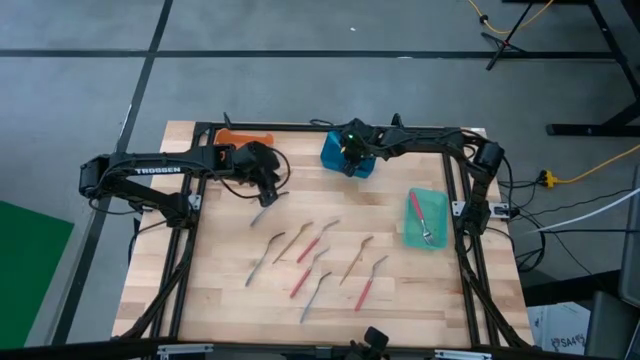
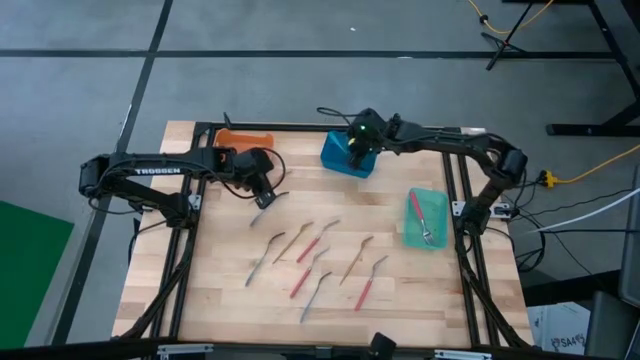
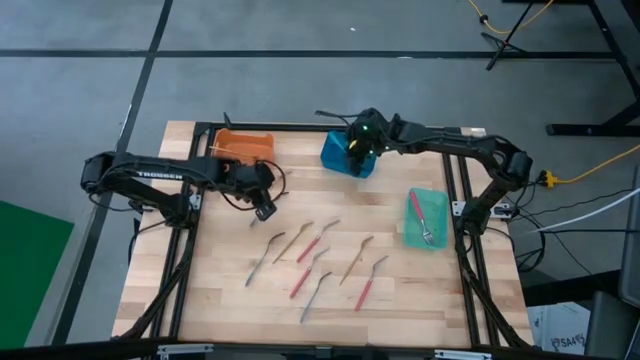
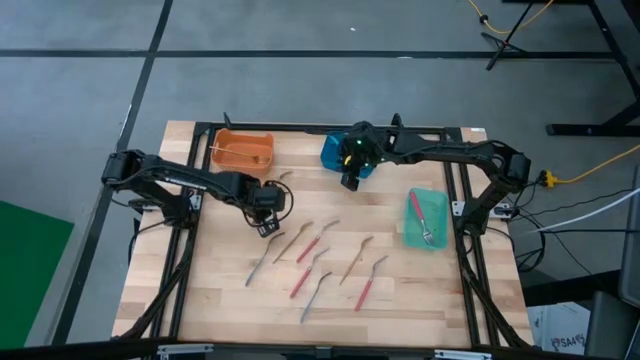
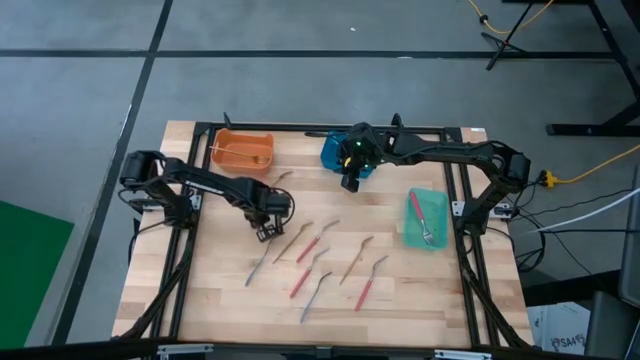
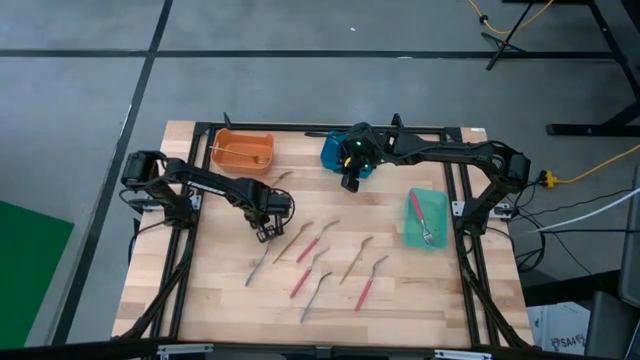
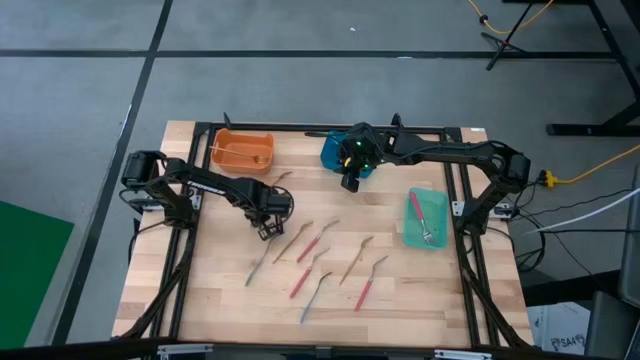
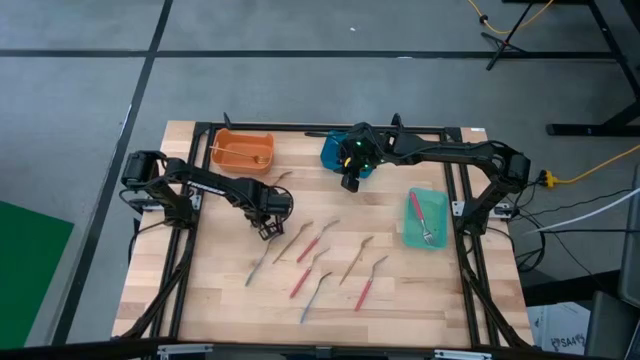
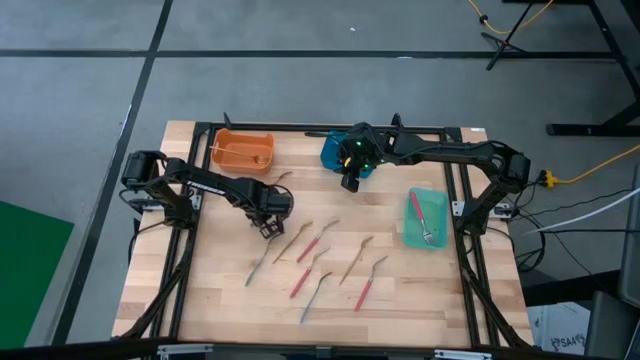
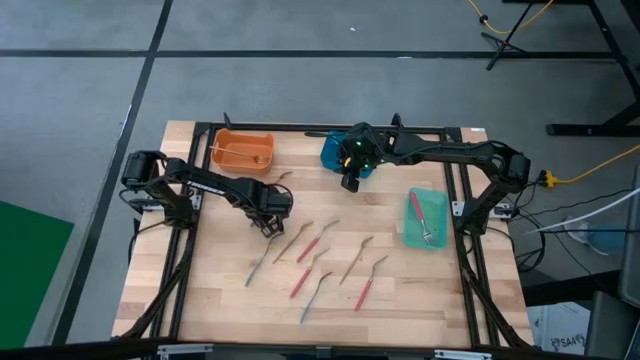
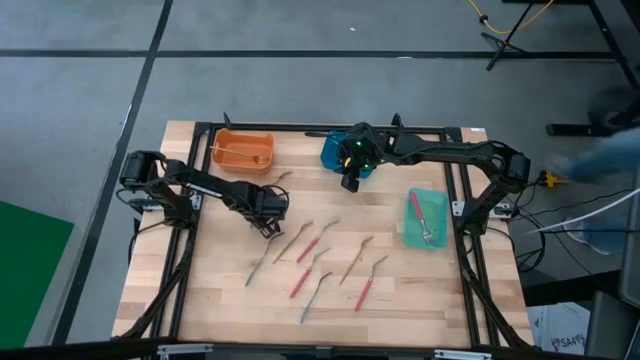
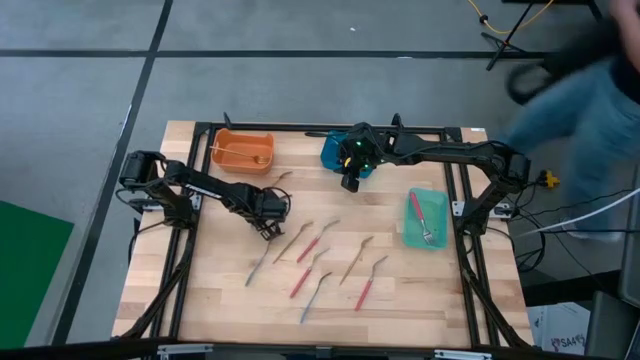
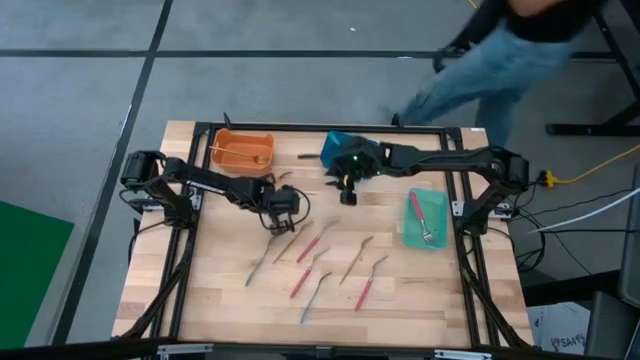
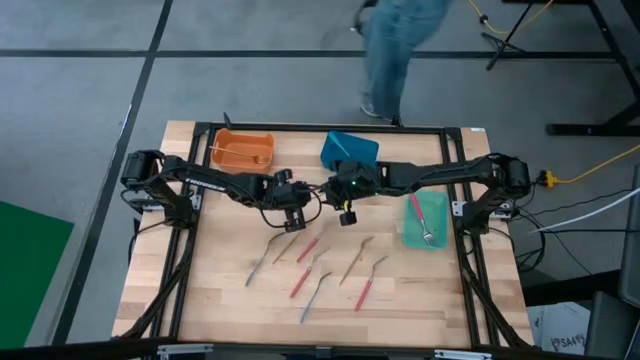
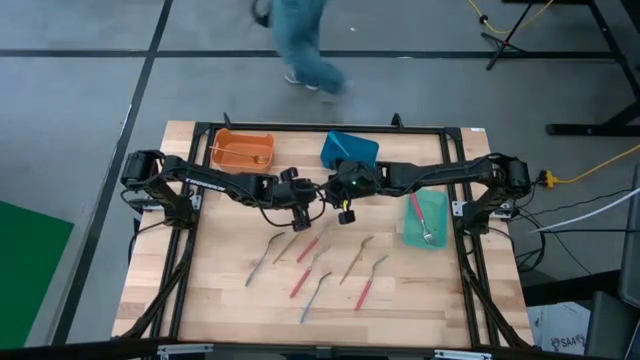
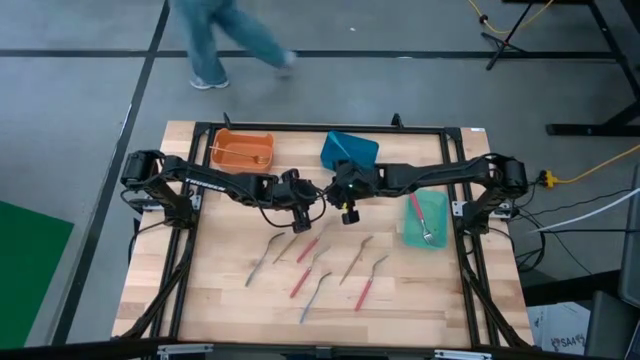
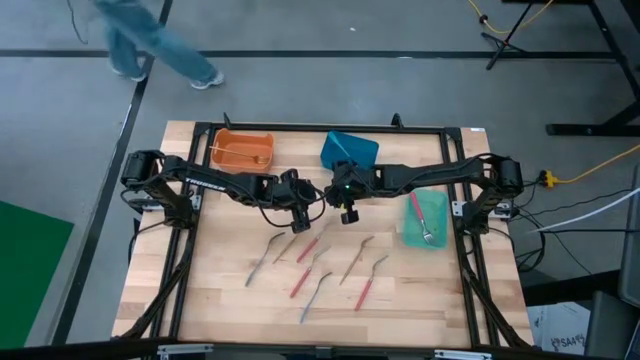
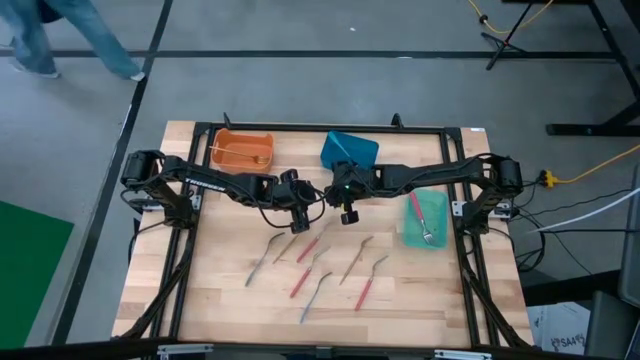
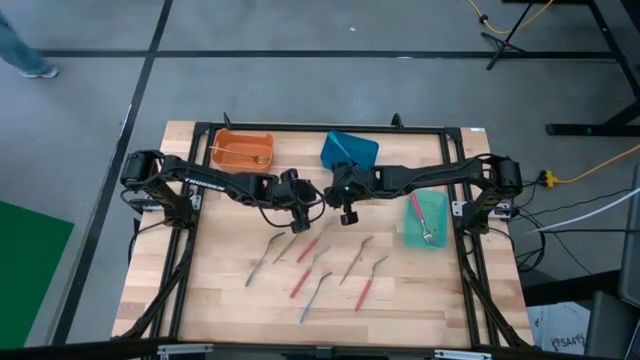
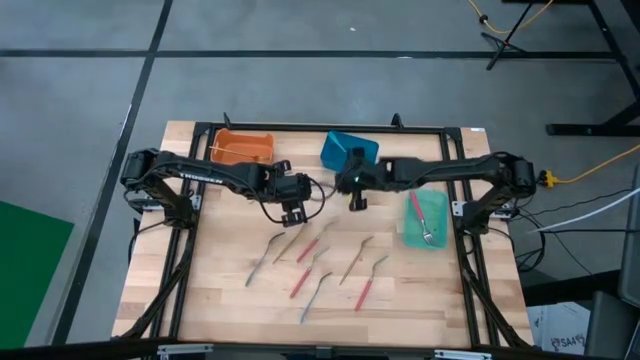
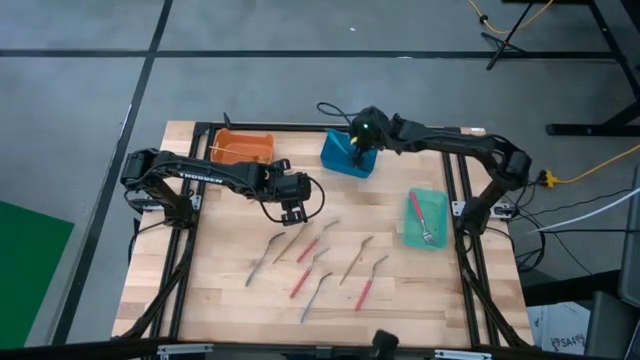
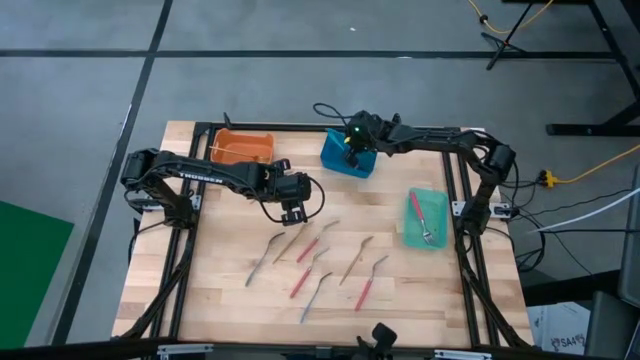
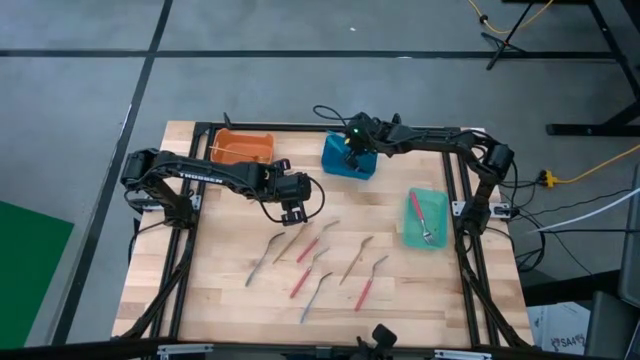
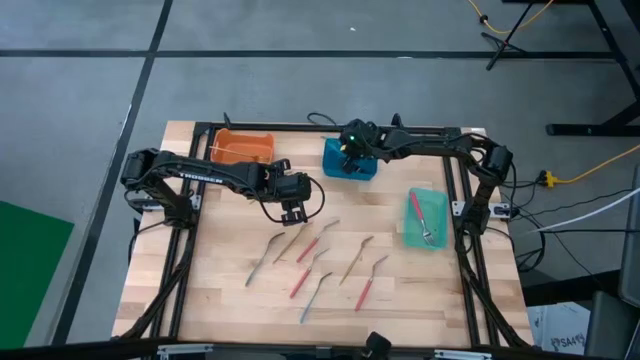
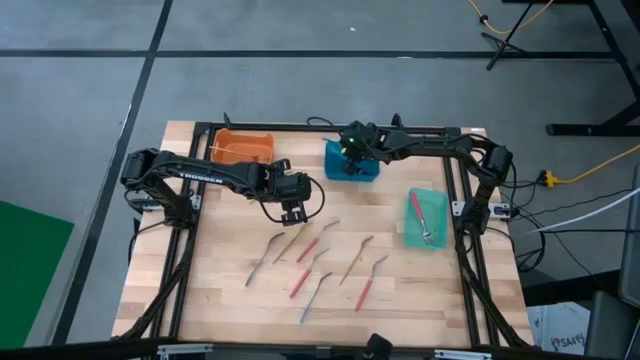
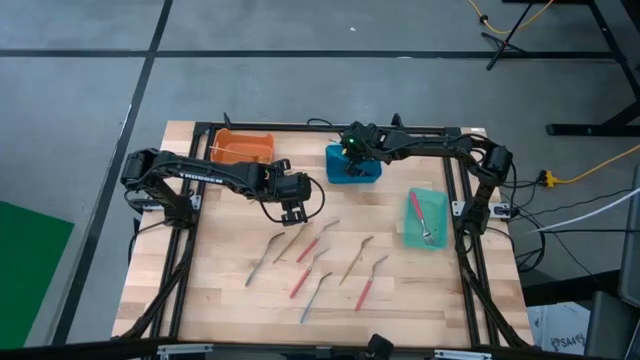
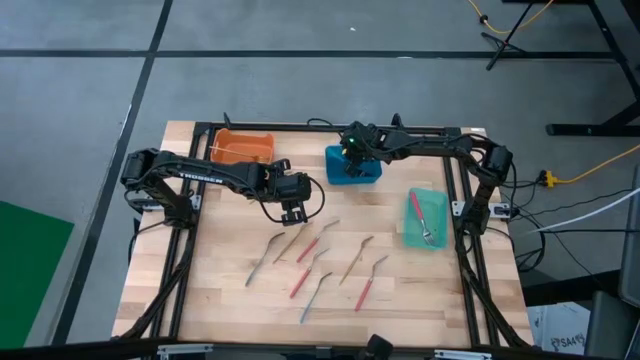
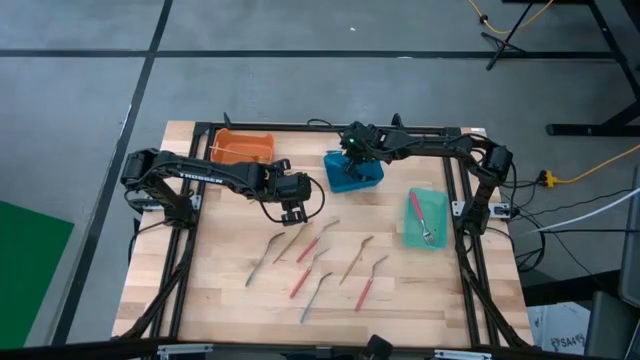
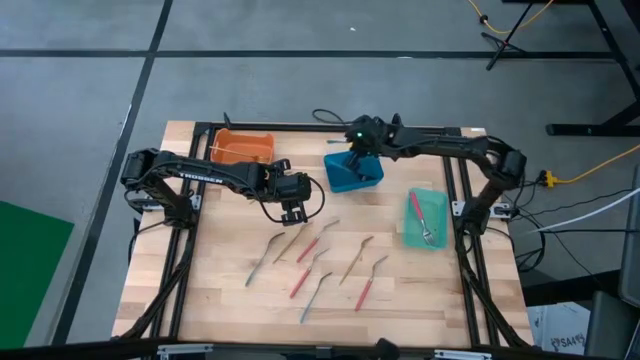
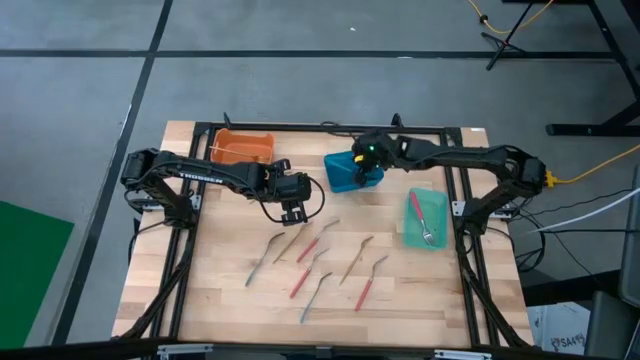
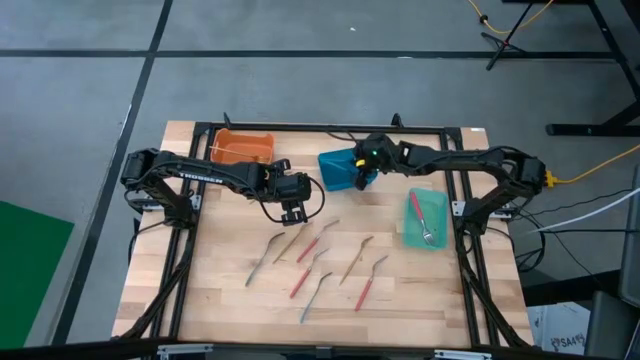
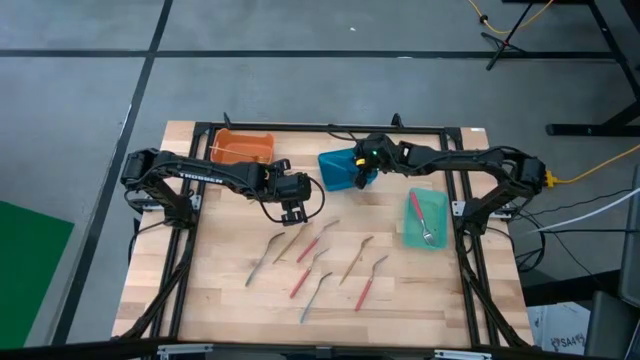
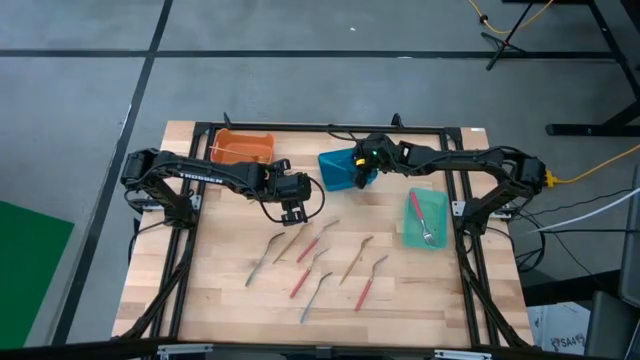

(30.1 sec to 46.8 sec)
Task: Sort silverware by color (type)
Put the blue fork into the blue bin

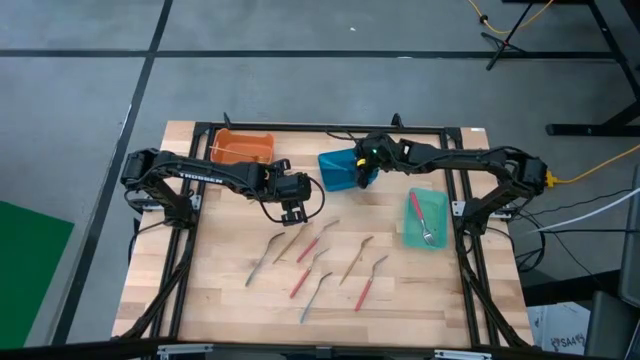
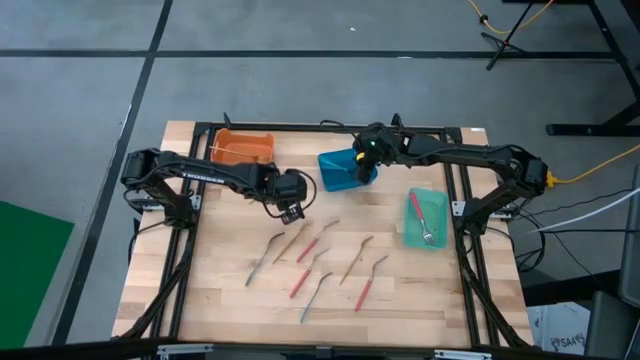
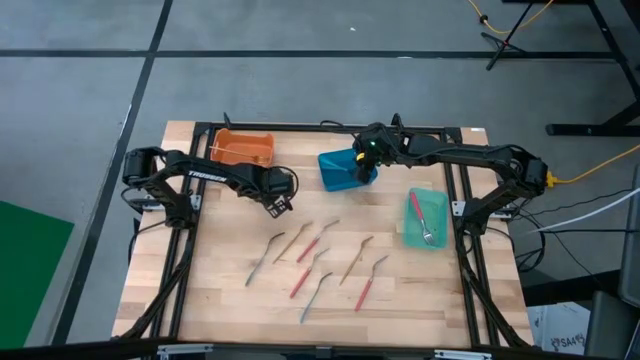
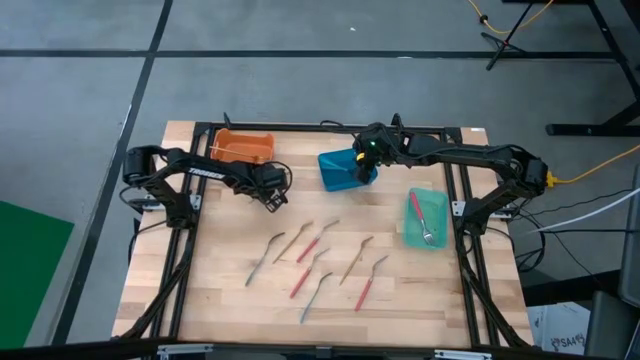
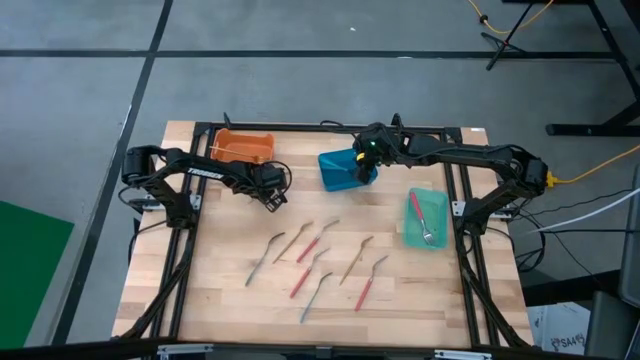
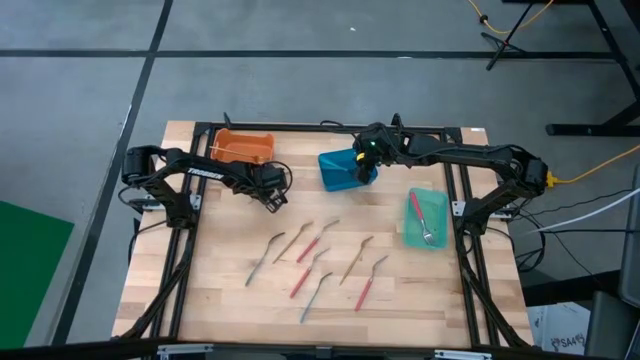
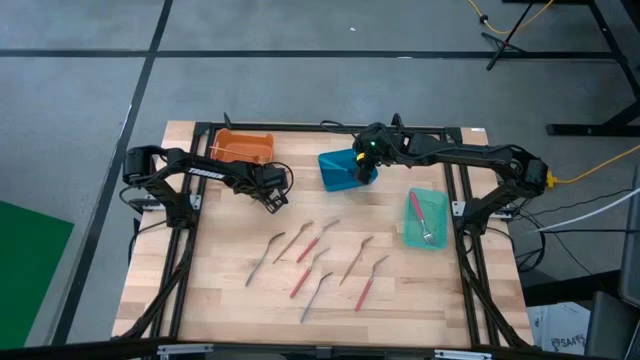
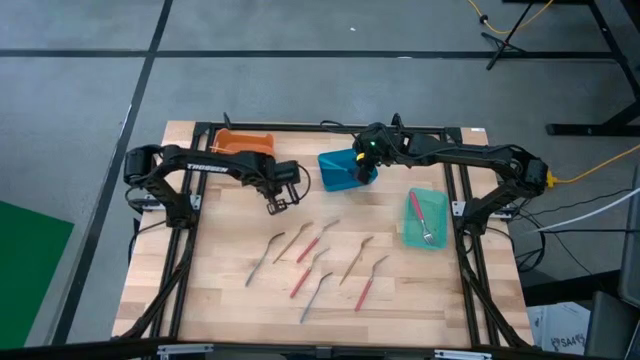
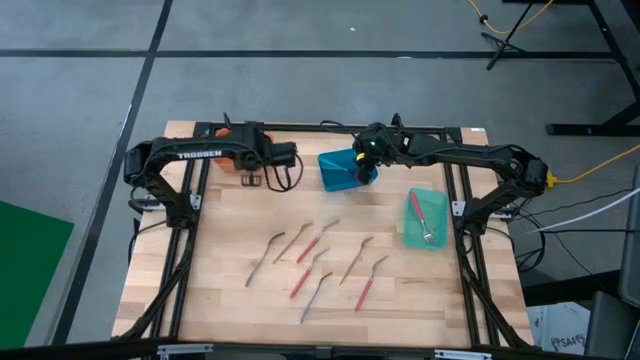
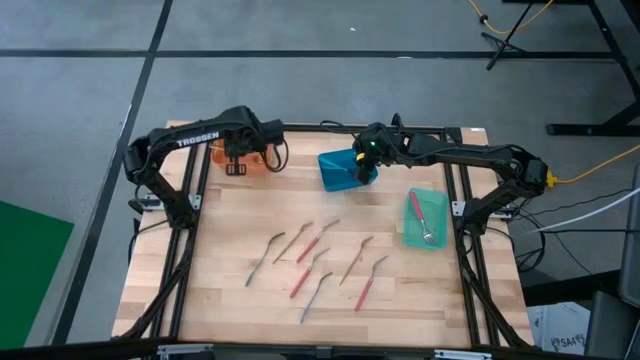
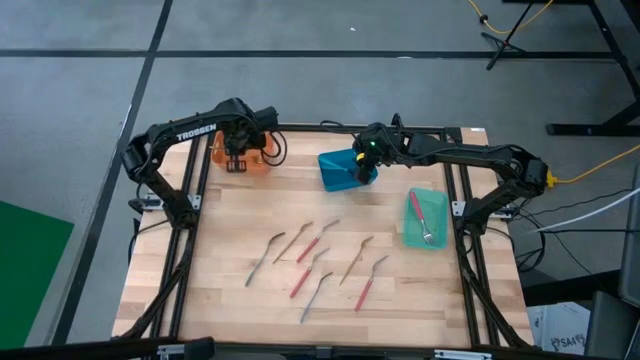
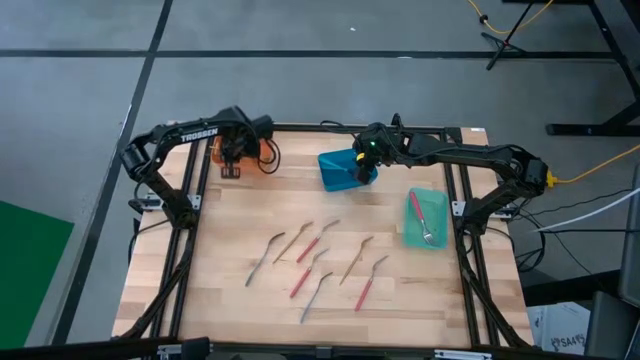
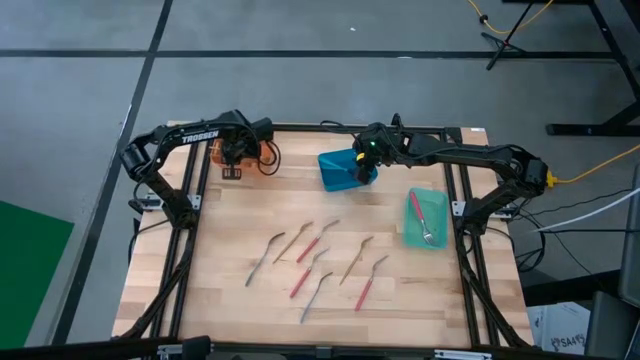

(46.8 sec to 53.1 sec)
Put the gold fork into the orange bin
